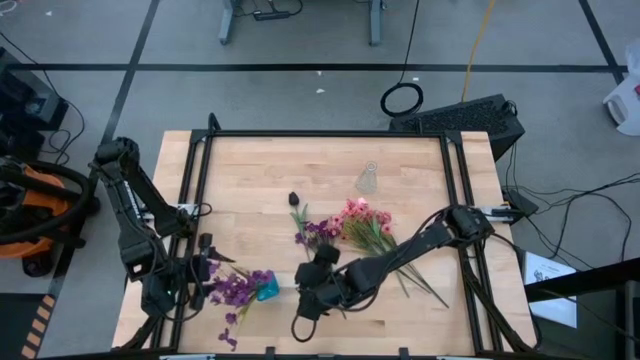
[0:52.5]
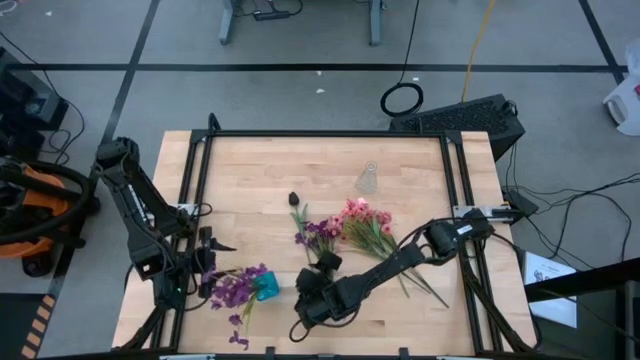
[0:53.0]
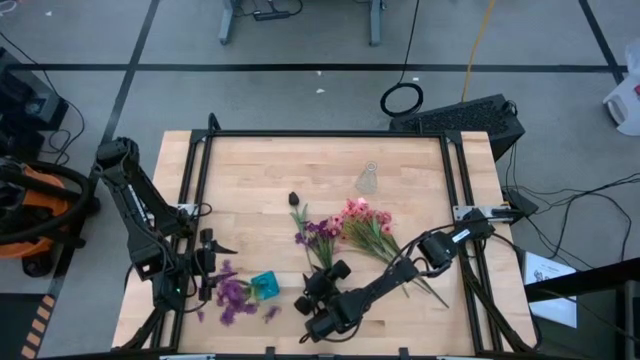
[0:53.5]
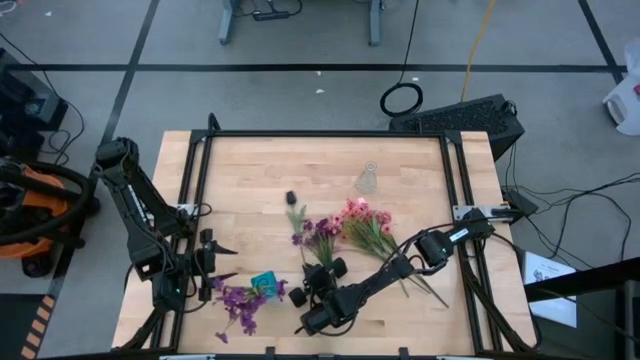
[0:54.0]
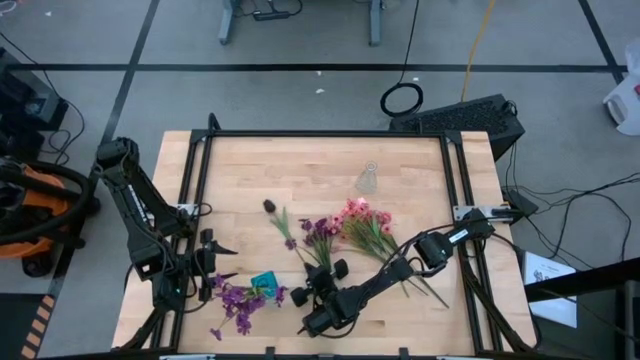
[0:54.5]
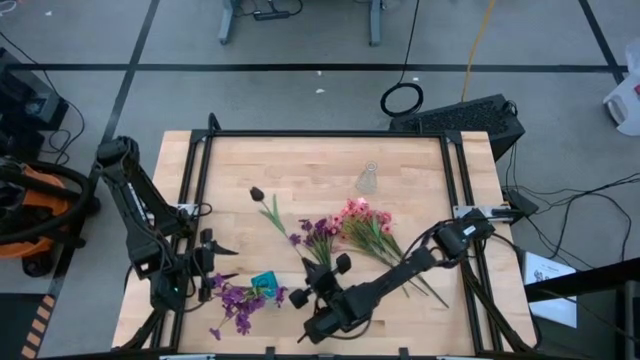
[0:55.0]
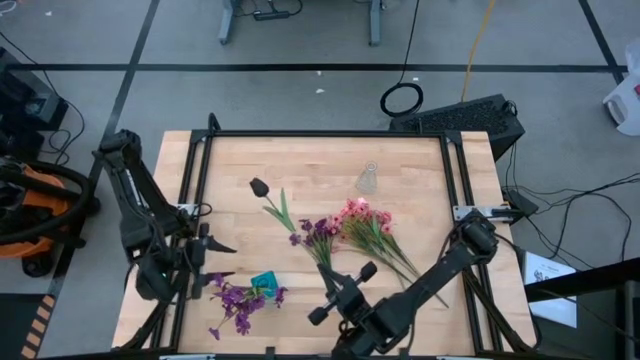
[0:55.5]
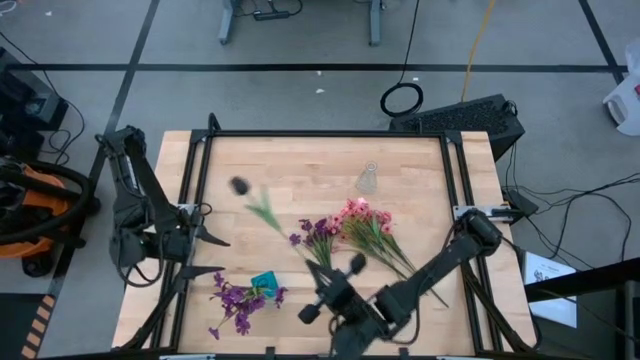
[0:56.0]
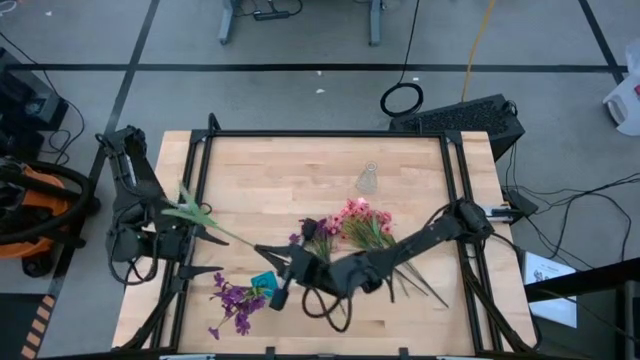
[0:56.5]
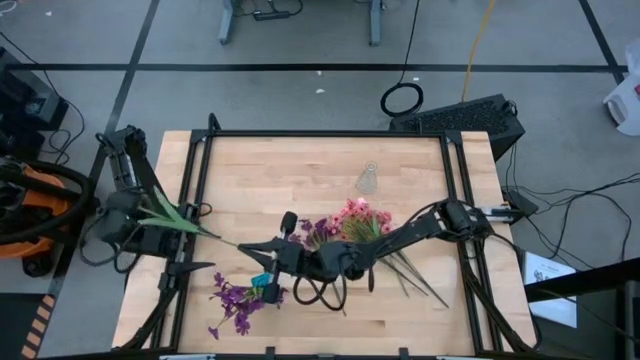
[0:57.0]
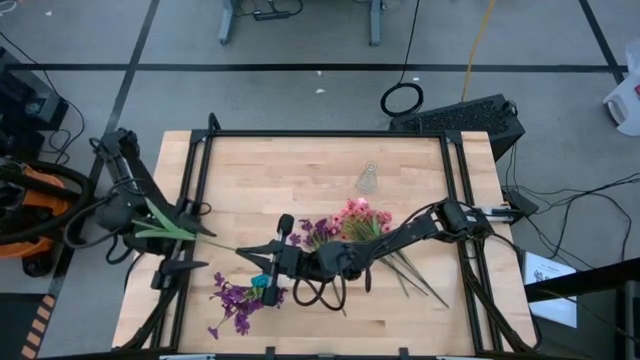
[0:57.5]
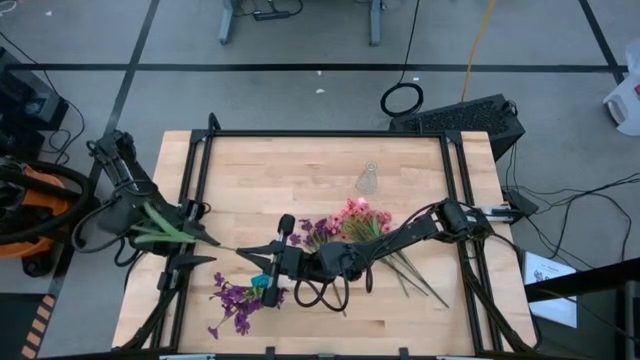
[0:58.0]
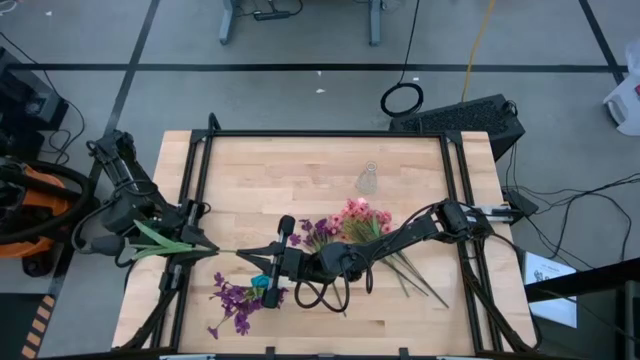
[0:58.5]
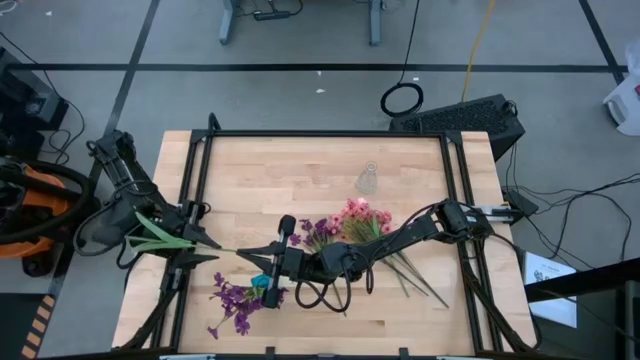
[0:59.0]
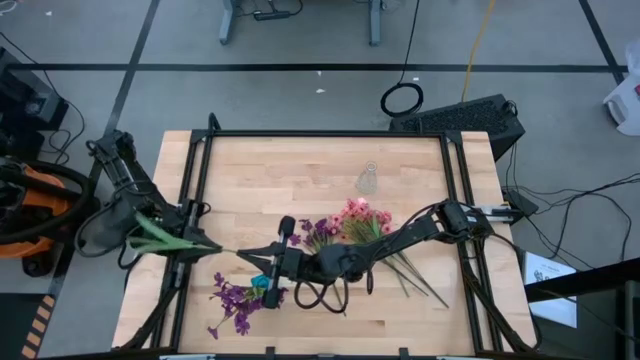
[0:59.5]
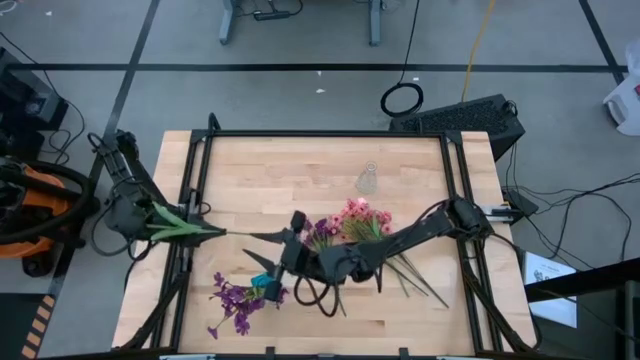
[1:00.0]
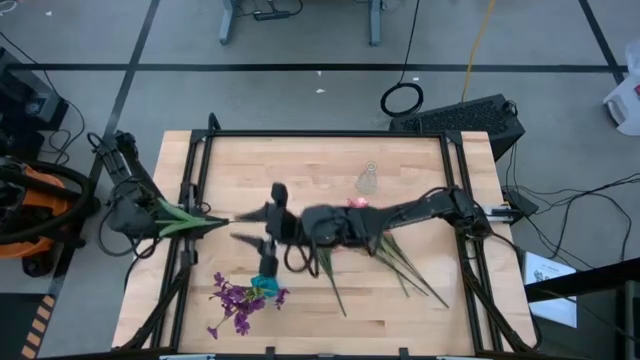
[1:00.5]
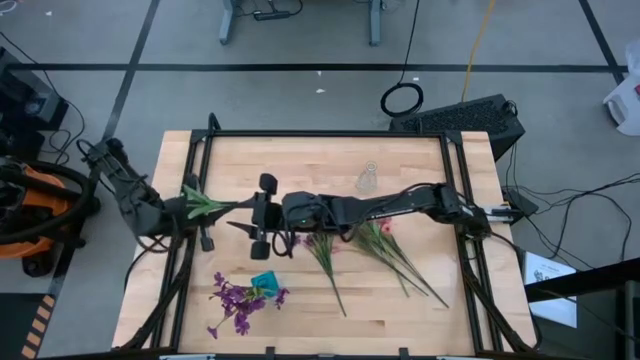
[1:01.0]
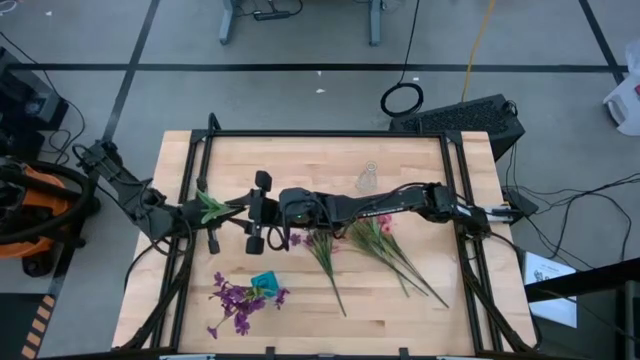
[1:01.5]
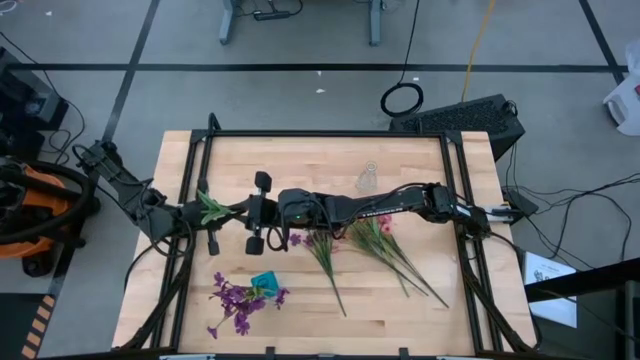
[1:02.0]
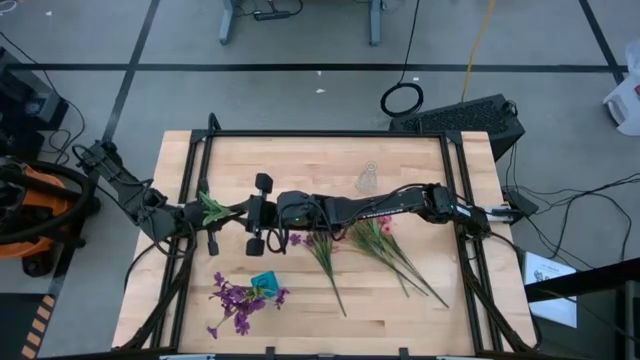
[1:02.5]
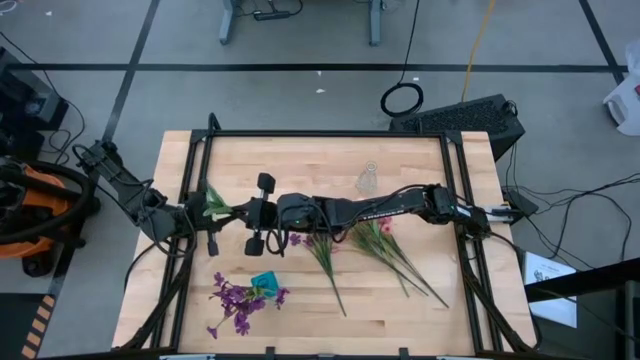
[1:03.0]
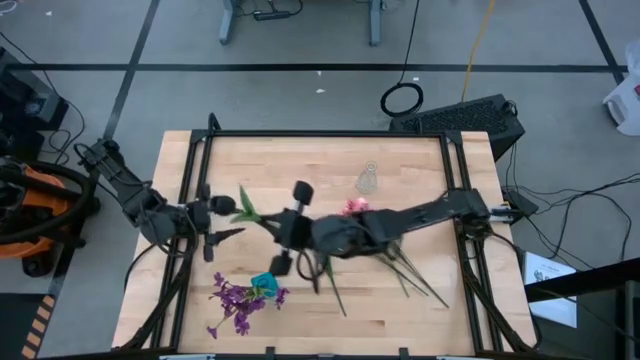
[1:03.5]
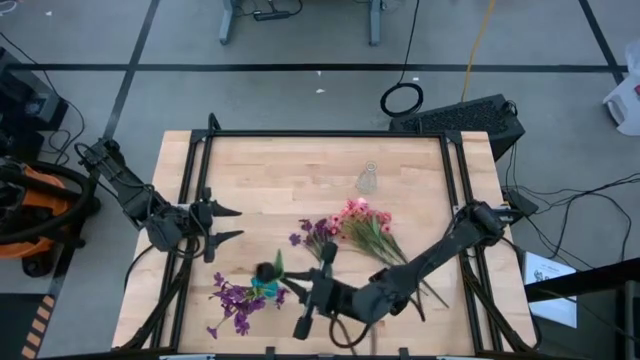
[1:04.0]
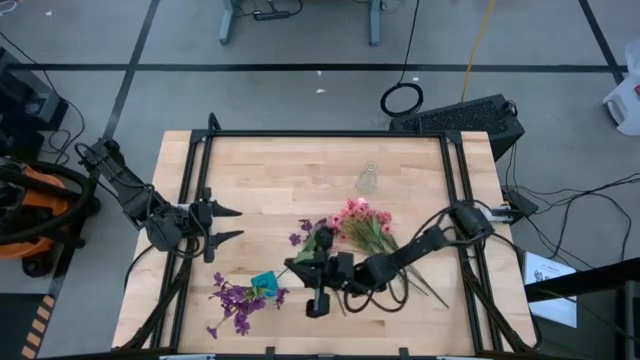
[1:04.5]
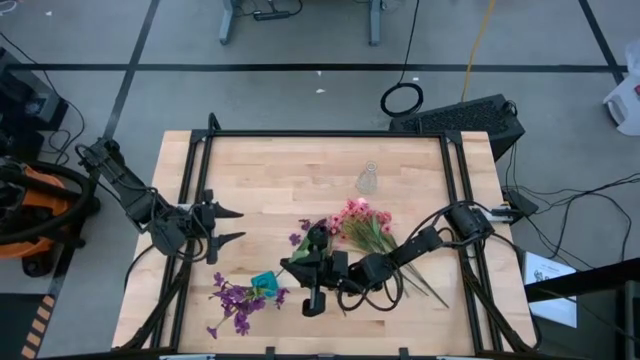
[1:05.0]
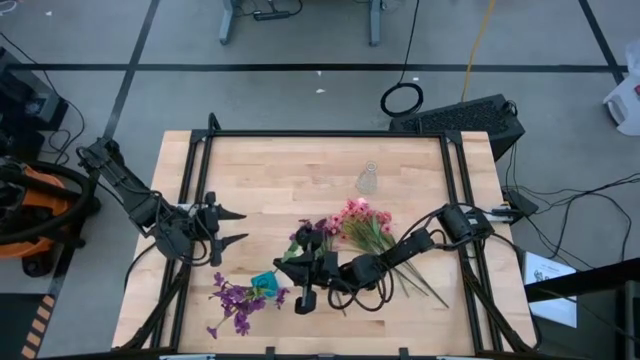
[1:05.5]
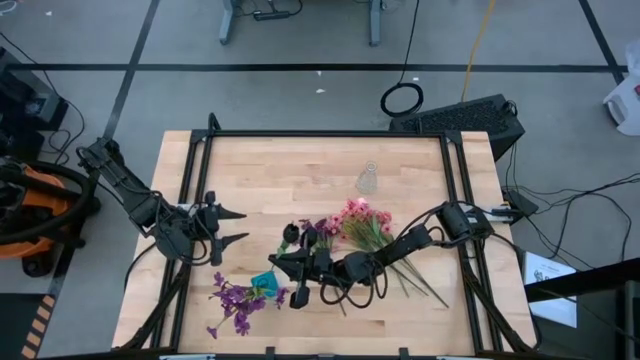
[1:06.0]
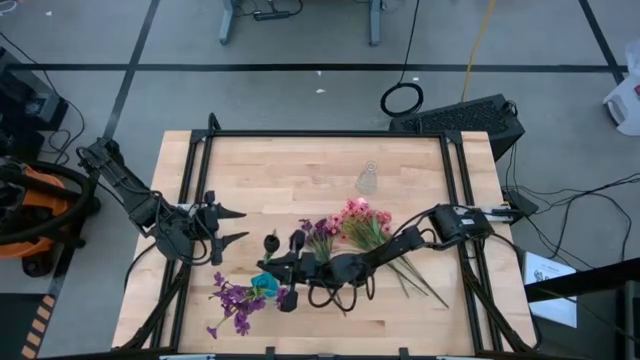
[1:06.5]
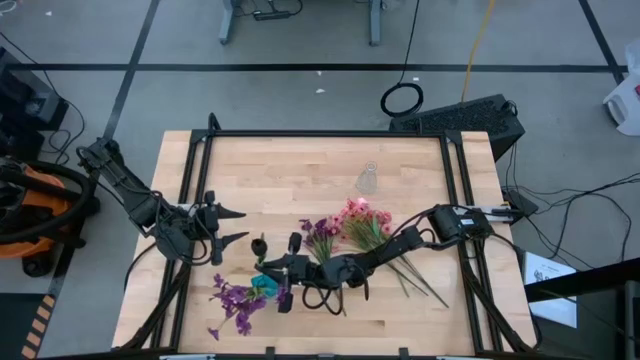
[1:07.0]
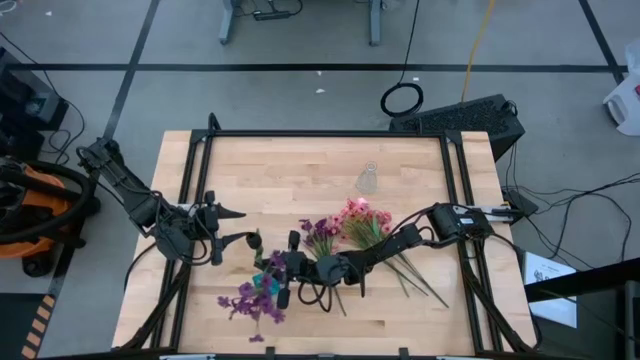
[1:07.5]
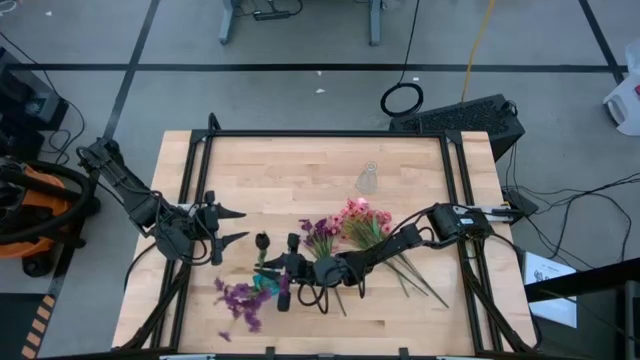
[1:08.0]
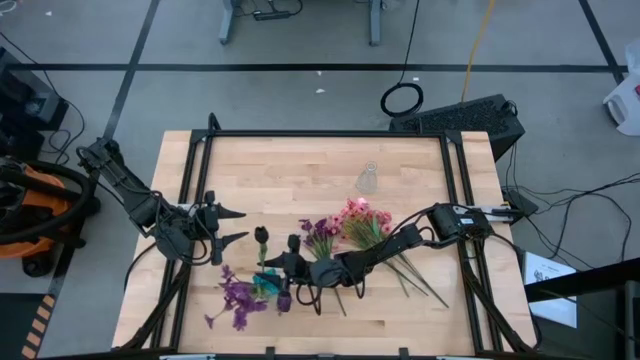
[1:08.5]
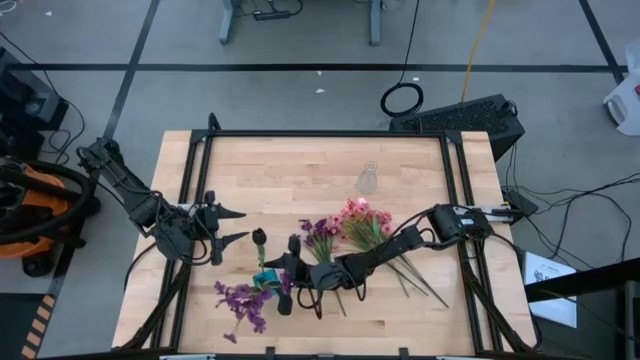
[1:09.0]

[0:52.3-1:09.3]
Task: Sort flowers into vase by color
Put the black tulip into the the blue vase

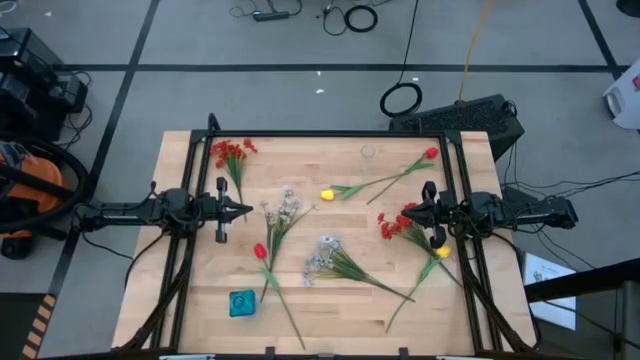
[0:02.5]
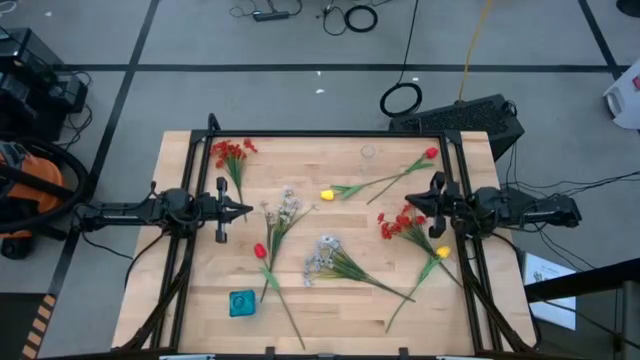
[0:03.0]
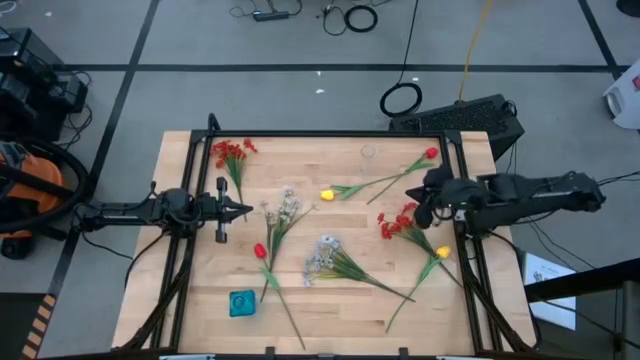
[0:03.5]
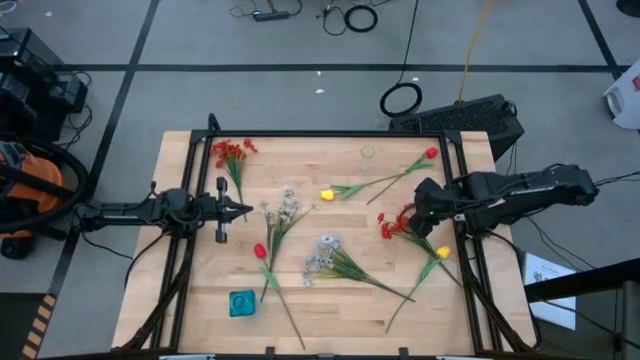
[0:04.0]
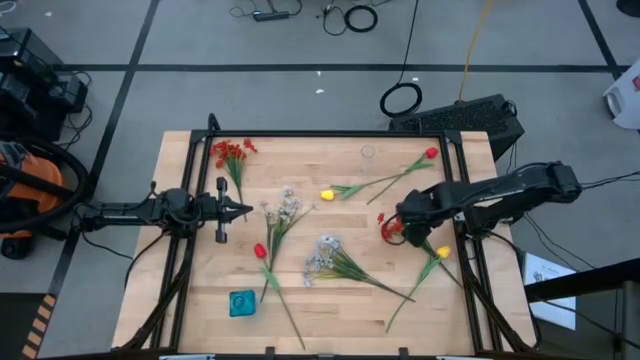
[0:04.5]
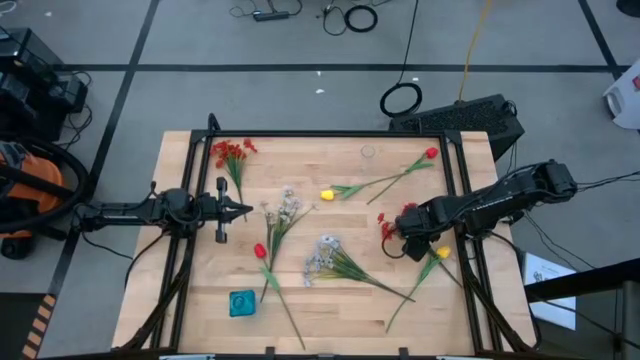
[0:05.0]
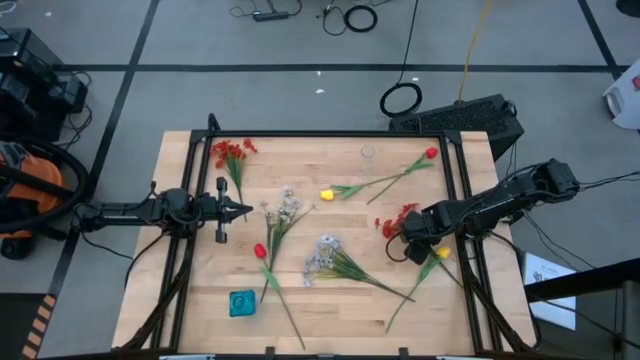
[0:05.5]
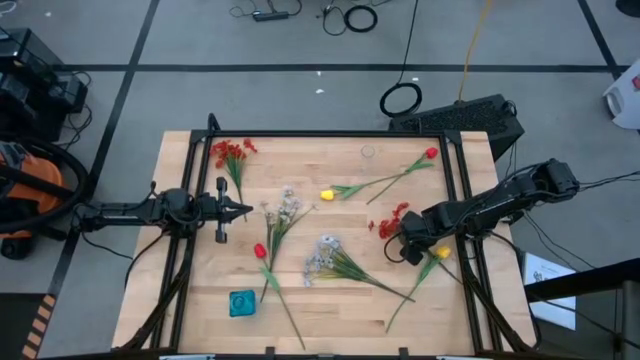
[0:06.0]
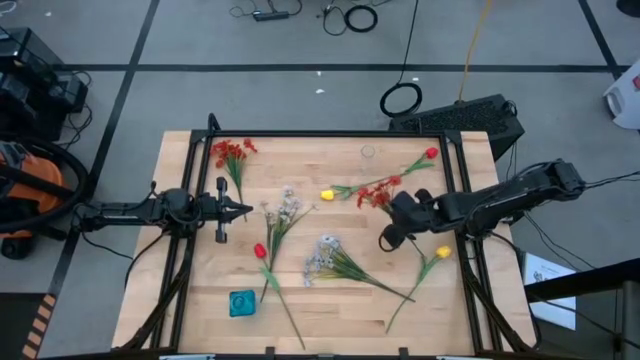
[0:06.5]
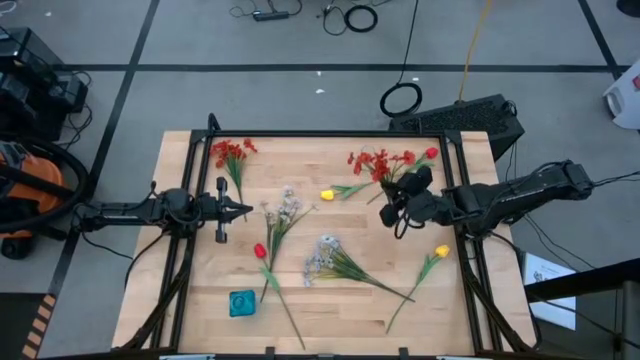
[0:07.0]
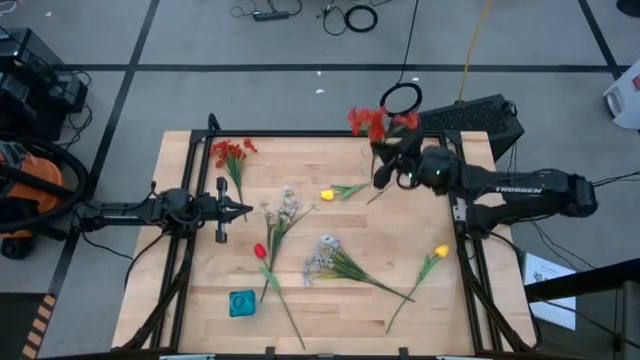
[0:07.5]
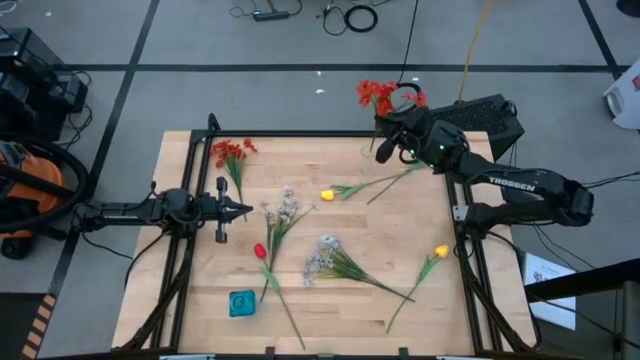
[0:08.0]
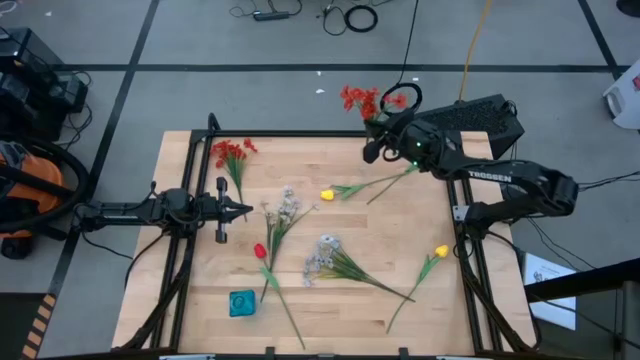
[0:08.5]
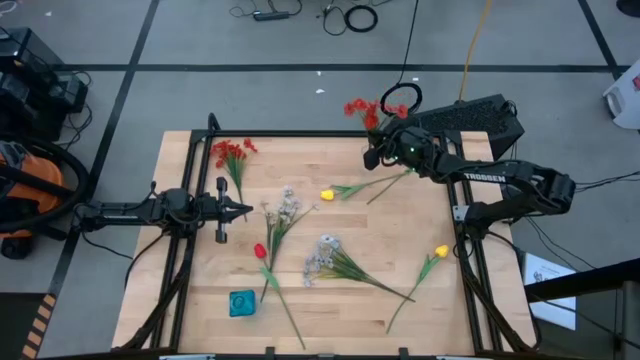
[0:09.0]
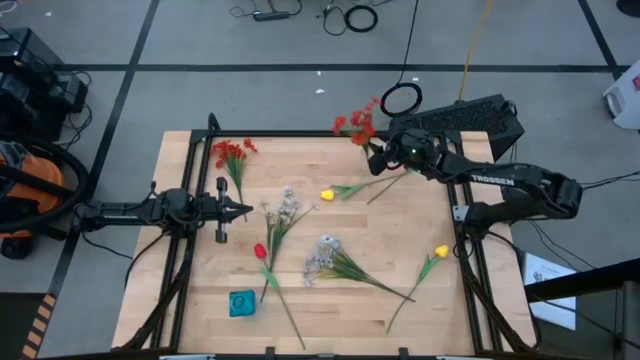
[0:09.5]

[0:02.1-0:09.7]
Task: Sort flowers into vase by color
Put the bottom red flowers into the transparent flower vase
